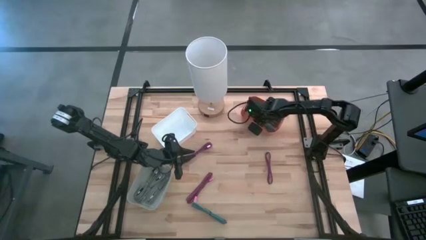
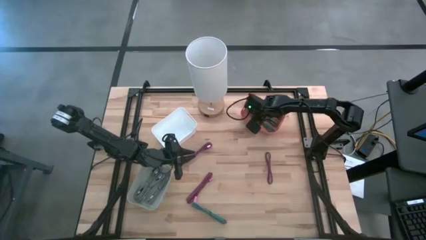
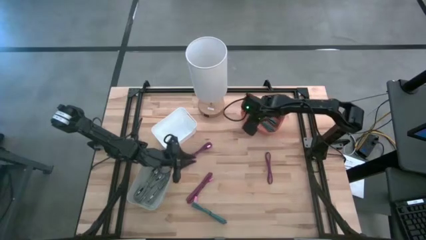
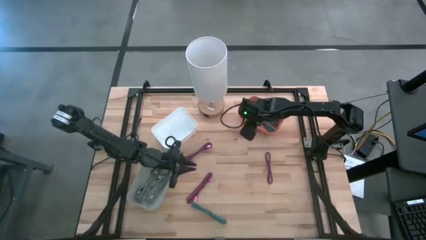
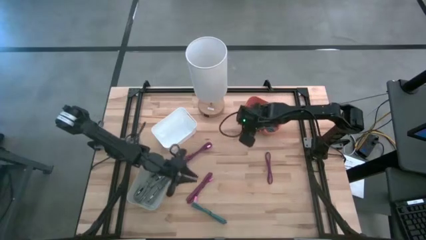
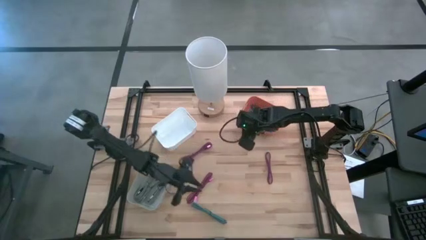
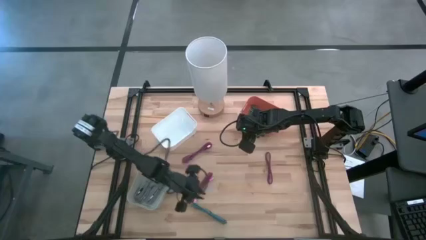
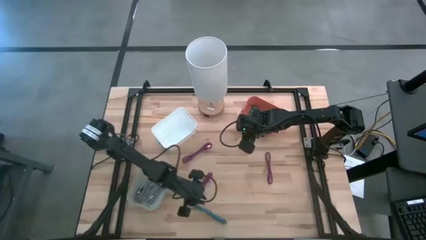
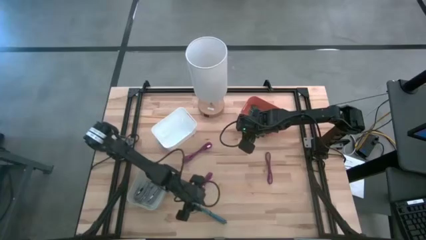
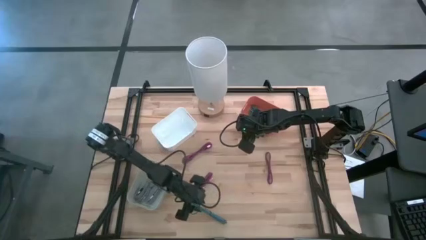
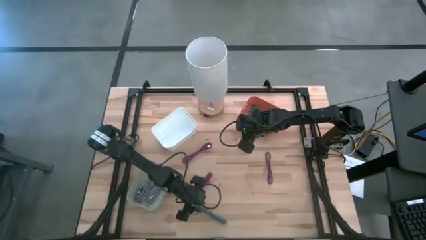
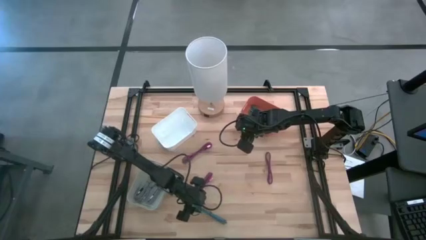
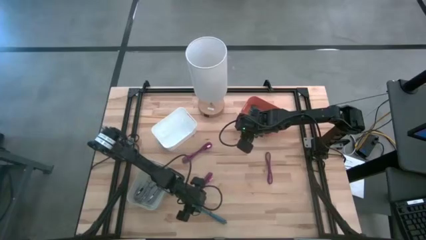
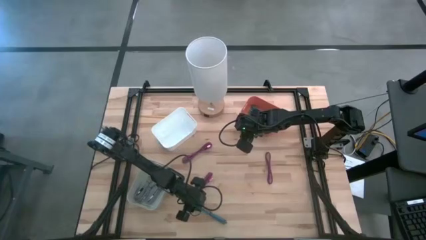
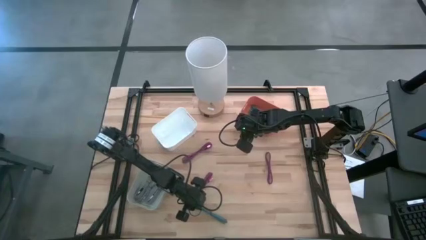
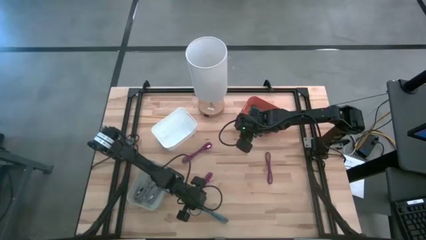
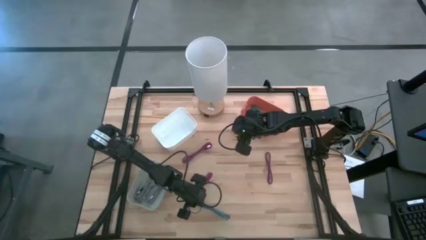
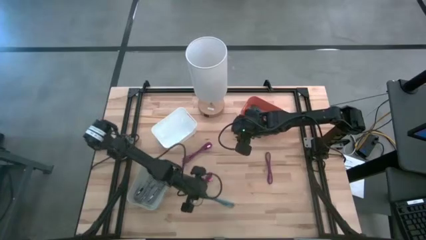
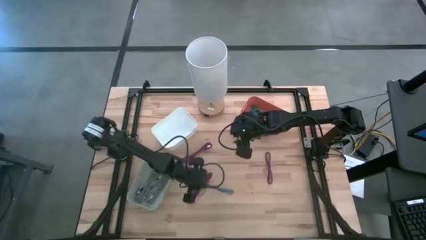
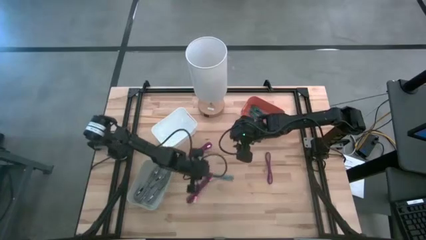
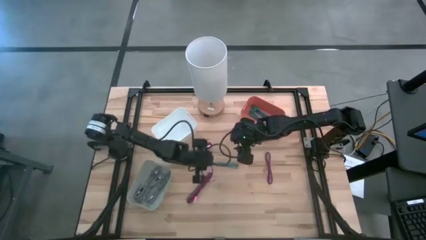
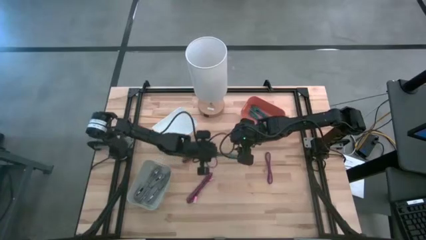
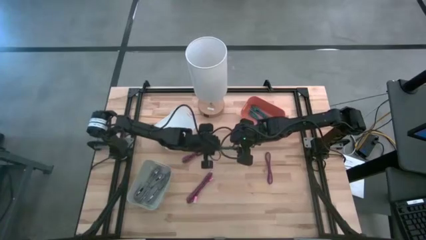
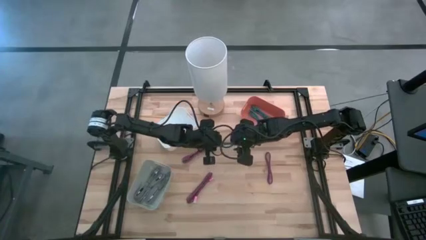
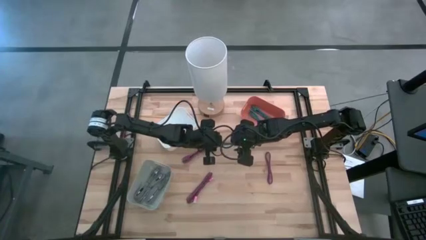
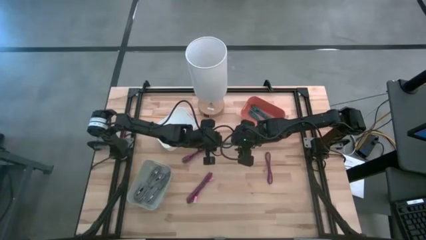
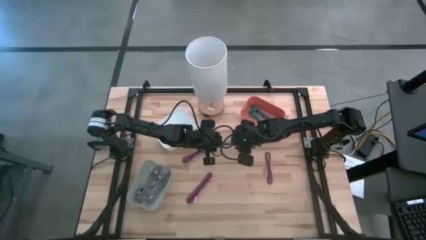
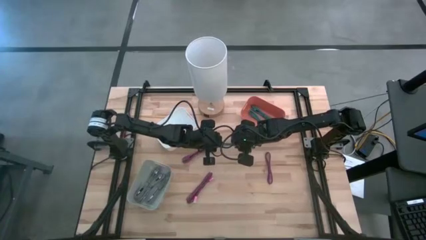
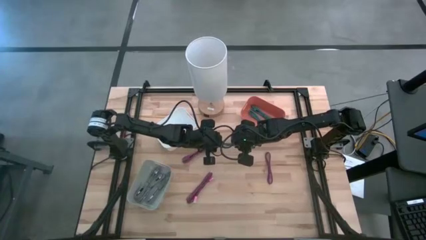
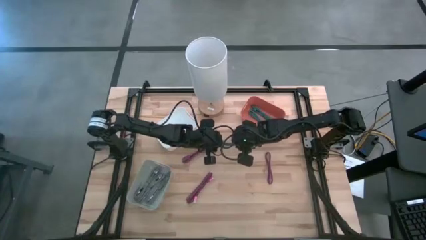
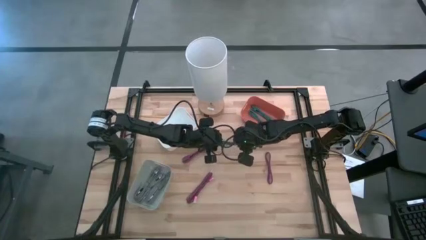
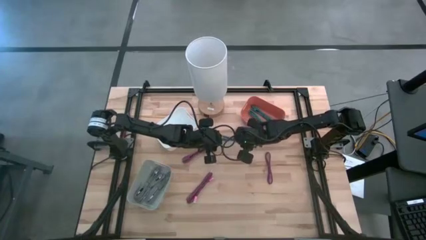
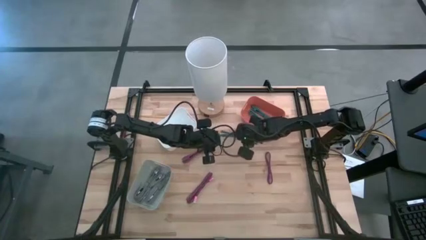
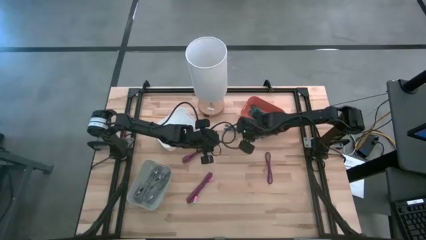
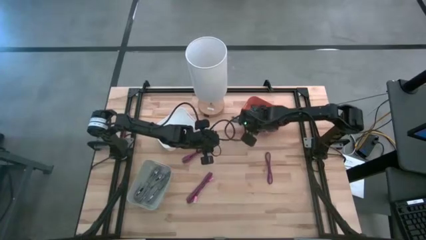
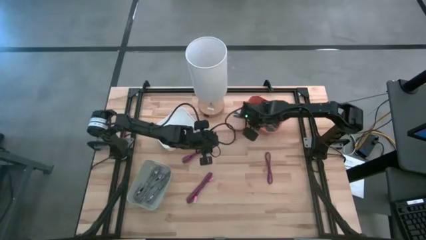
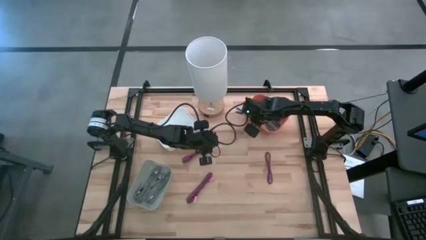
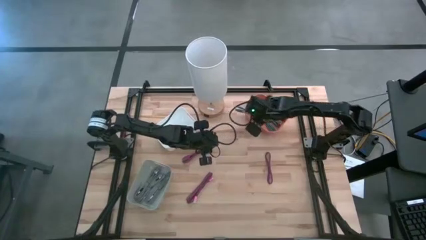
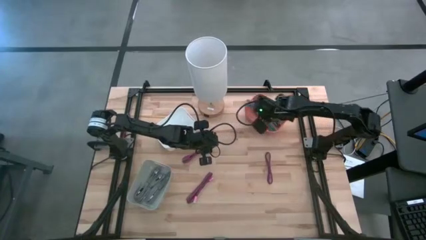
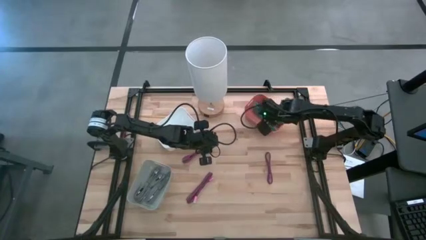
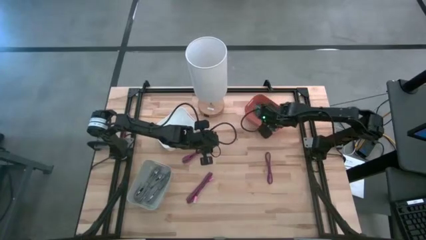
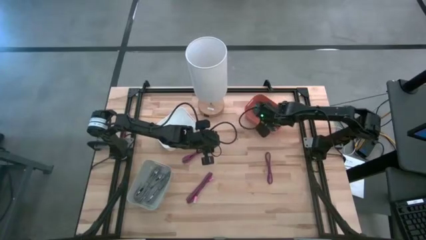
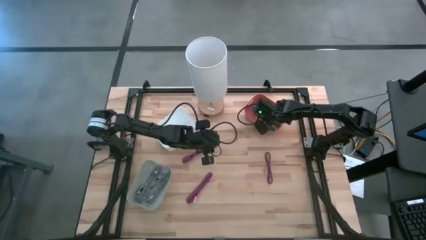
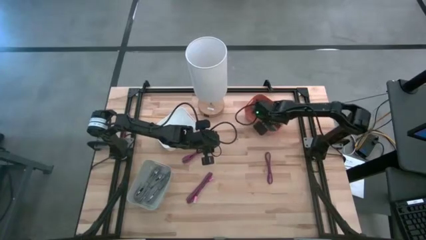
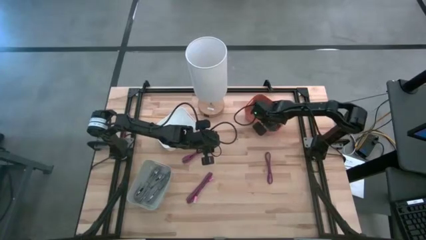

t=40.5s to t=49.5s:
Task: Pick & Place USB Port
Put the blue and black charger cable into the orange bin

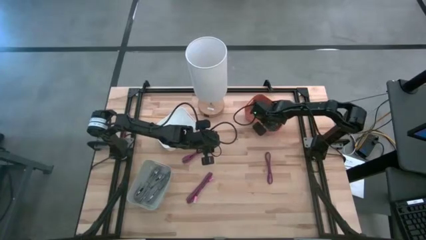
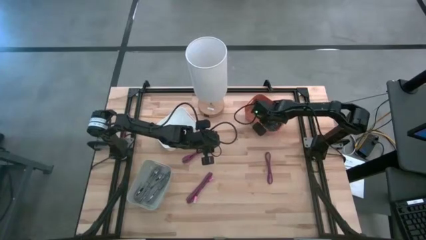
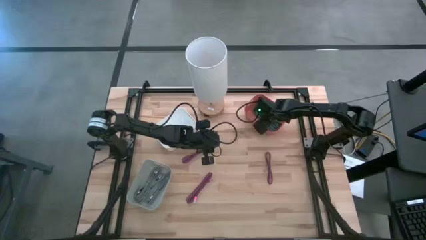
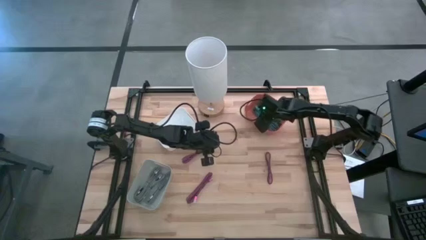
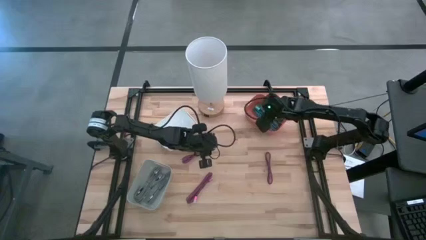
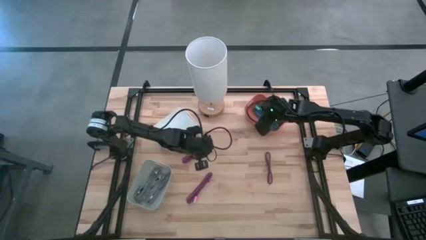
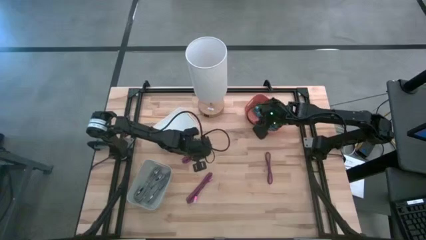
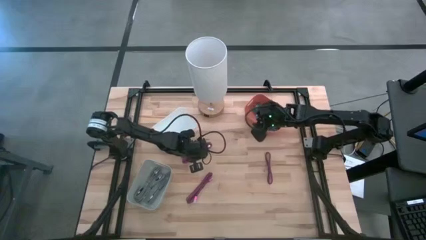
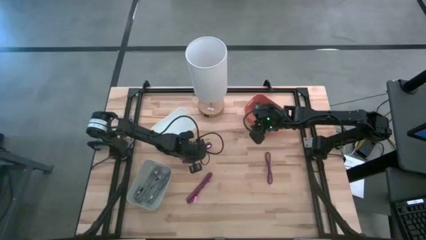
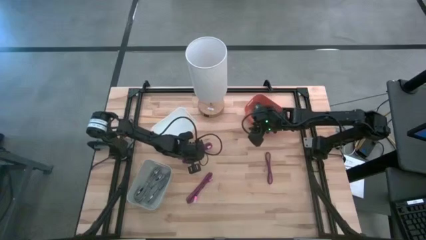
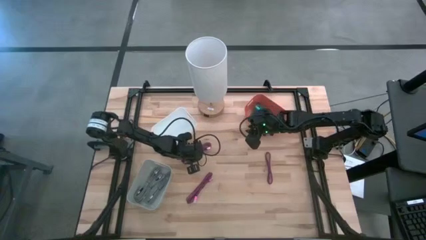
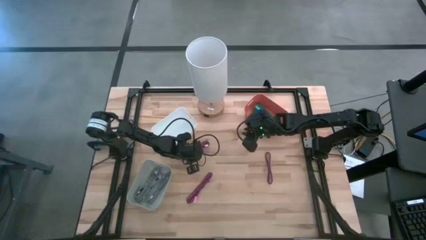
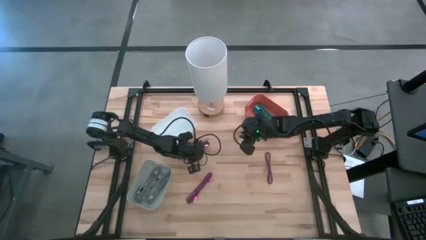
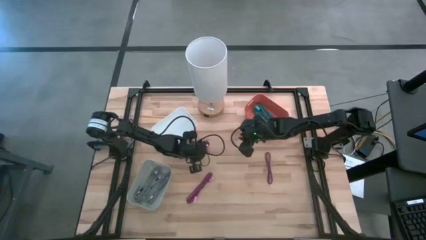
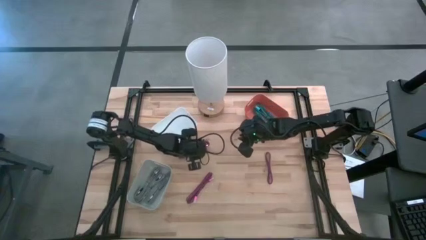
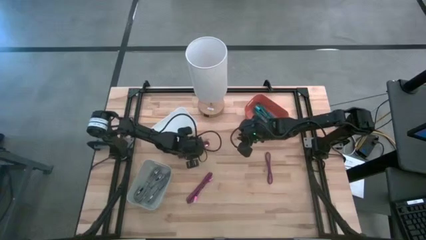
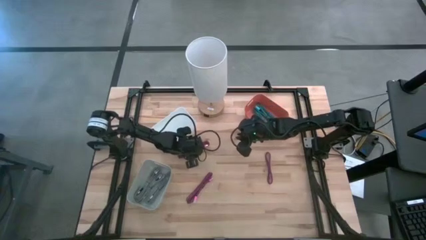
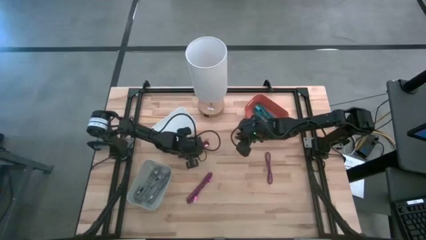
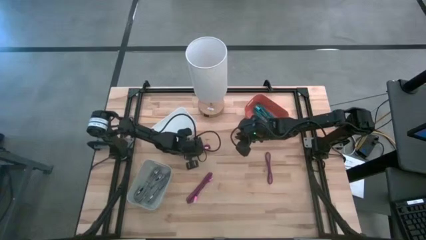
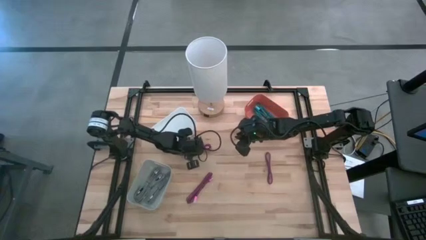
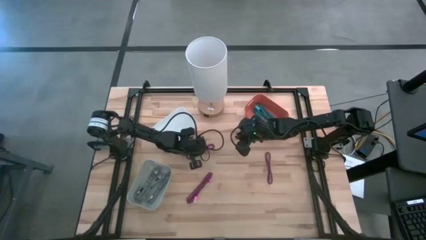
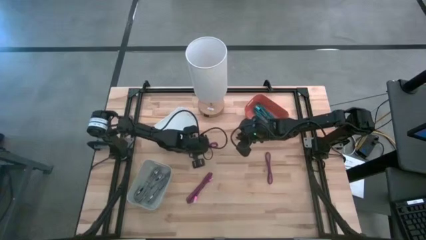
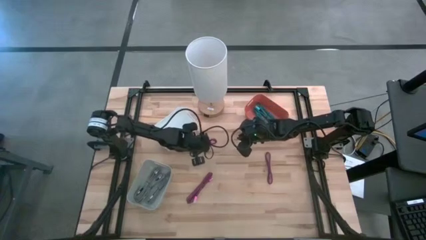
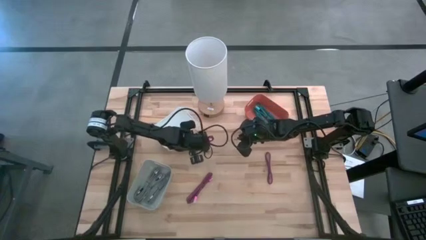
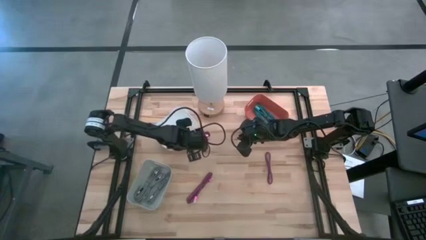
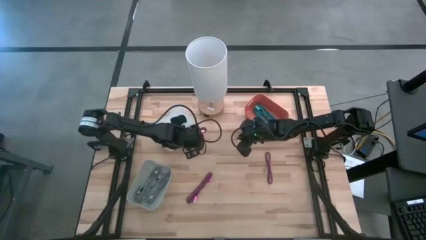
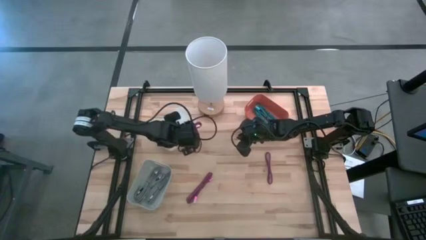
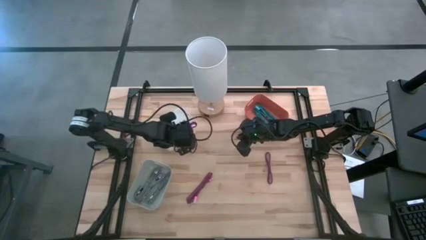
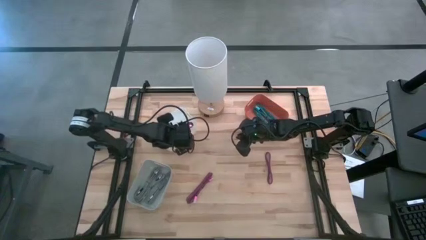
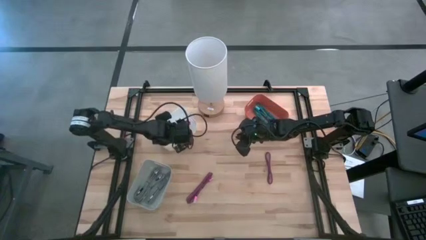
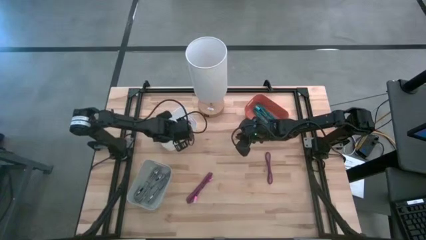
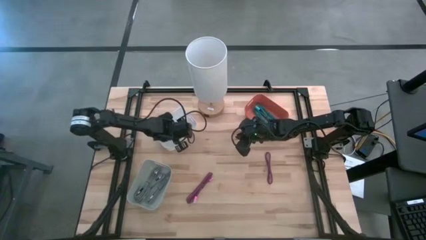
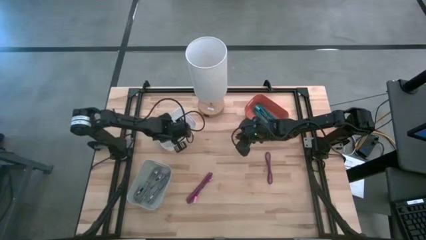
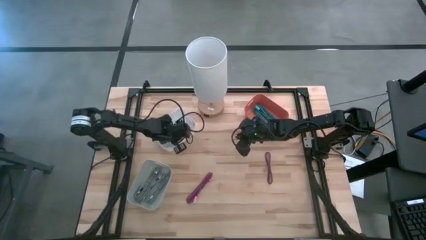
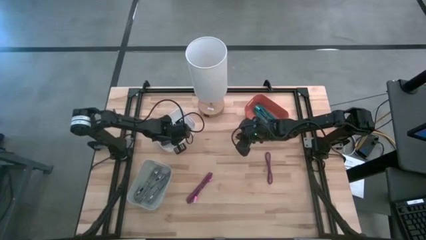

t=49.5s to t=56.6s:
Put the top red and black charger cable into the white bin
